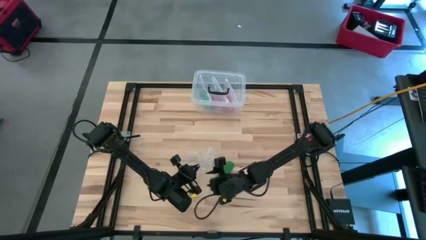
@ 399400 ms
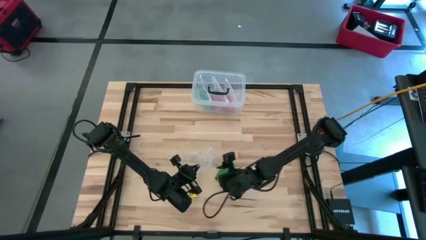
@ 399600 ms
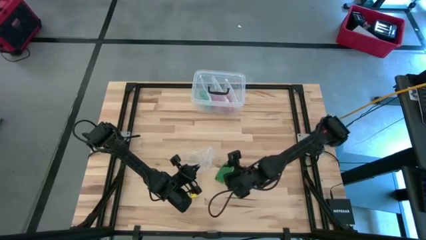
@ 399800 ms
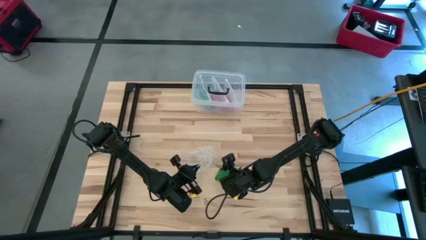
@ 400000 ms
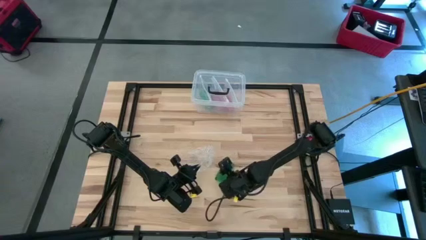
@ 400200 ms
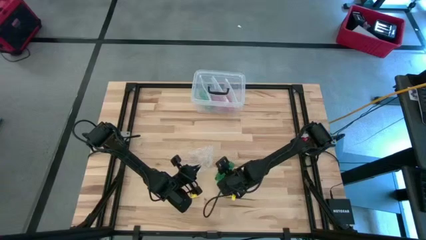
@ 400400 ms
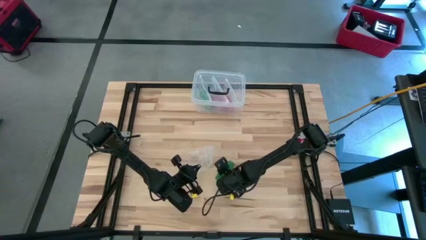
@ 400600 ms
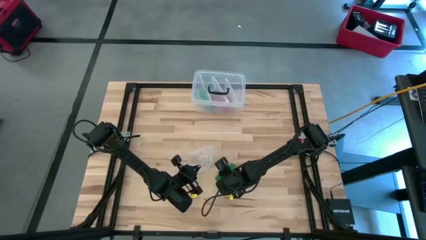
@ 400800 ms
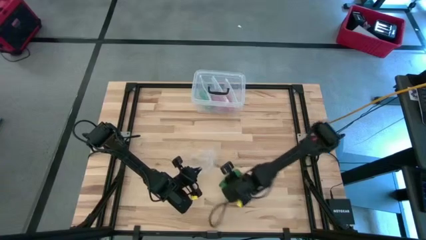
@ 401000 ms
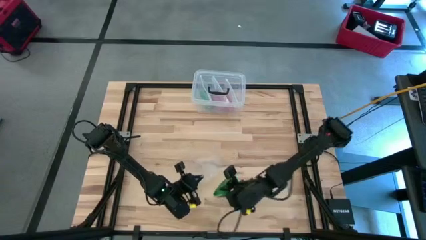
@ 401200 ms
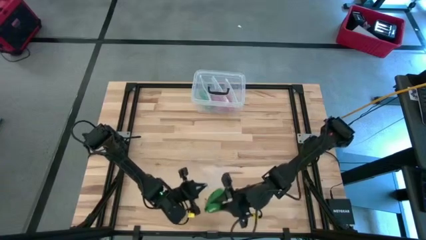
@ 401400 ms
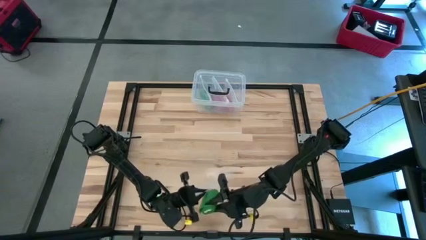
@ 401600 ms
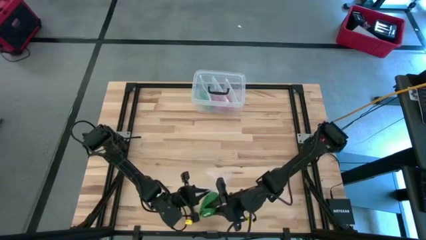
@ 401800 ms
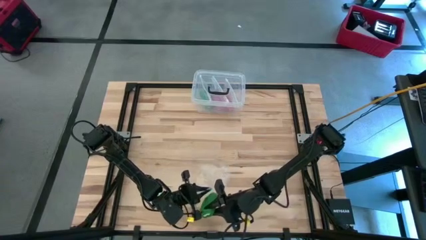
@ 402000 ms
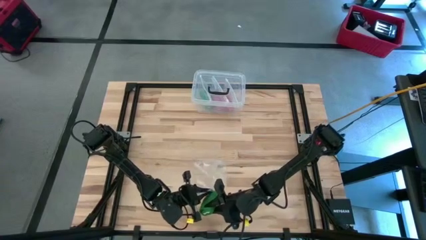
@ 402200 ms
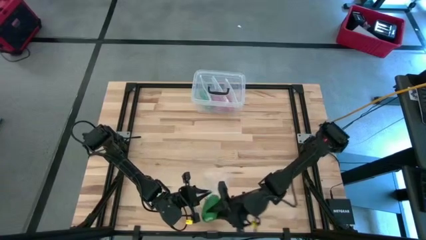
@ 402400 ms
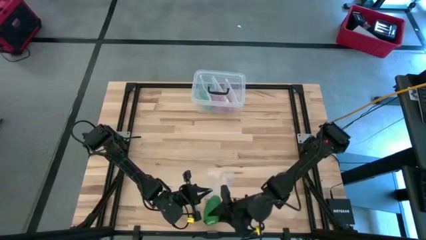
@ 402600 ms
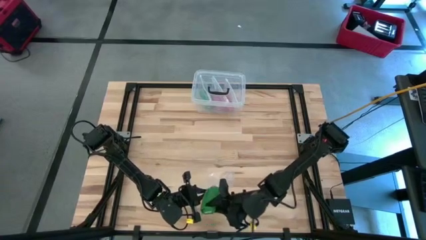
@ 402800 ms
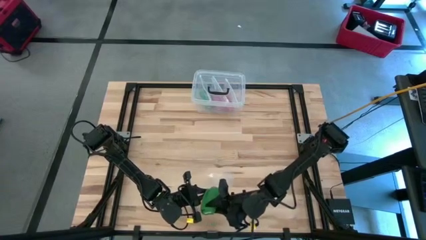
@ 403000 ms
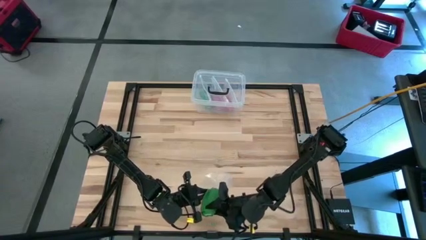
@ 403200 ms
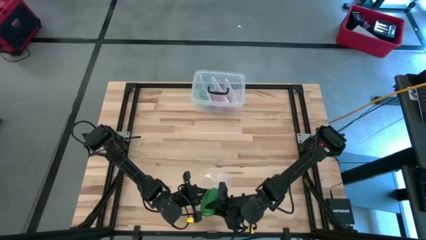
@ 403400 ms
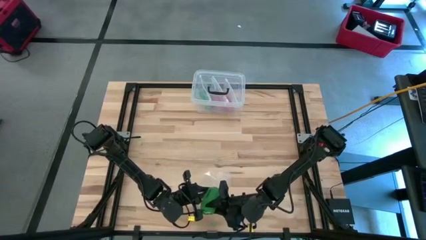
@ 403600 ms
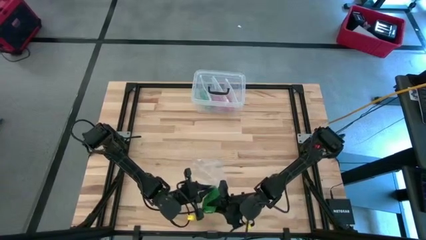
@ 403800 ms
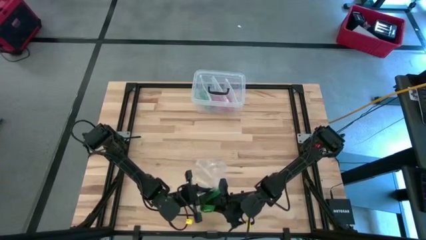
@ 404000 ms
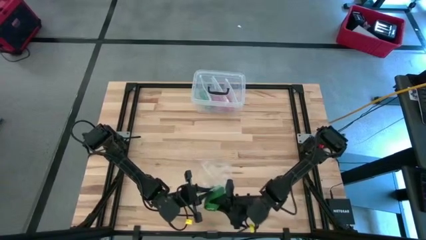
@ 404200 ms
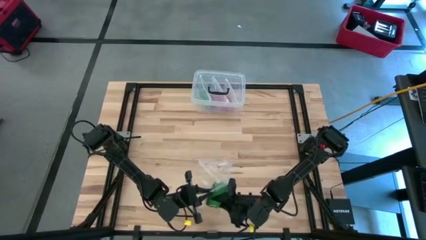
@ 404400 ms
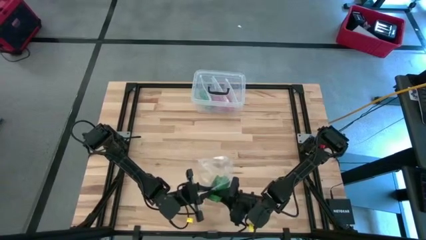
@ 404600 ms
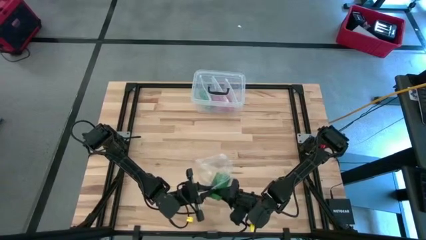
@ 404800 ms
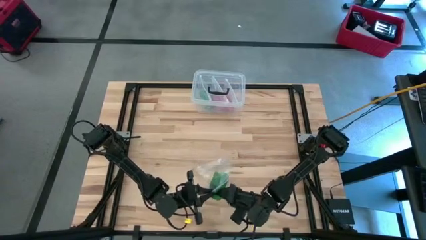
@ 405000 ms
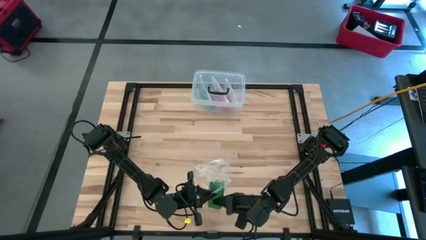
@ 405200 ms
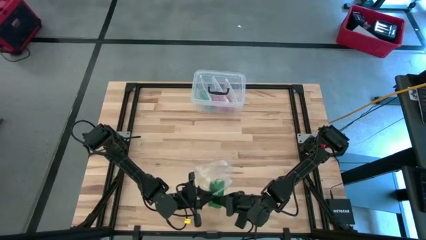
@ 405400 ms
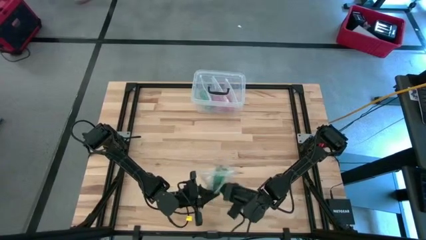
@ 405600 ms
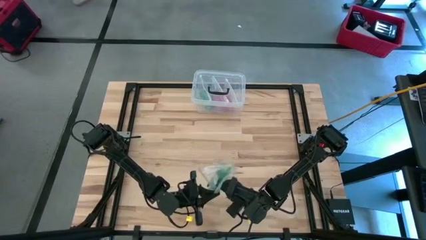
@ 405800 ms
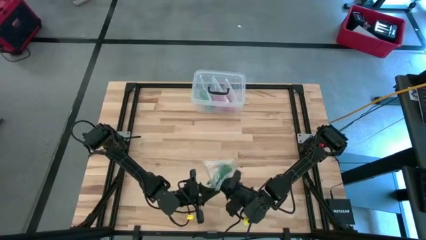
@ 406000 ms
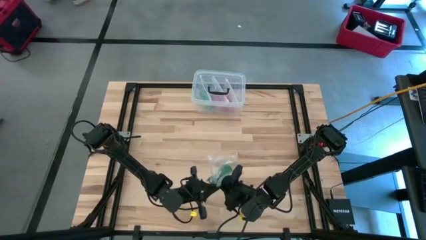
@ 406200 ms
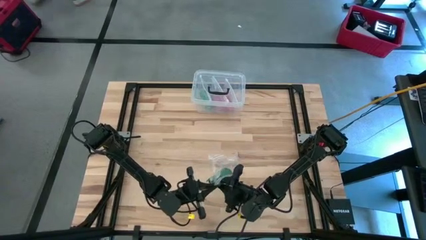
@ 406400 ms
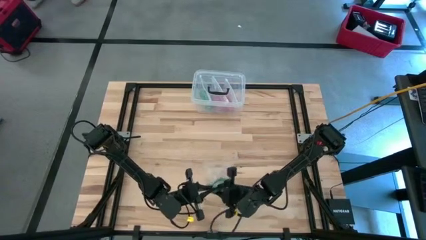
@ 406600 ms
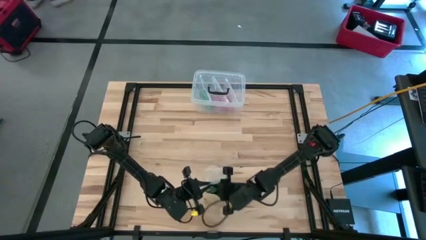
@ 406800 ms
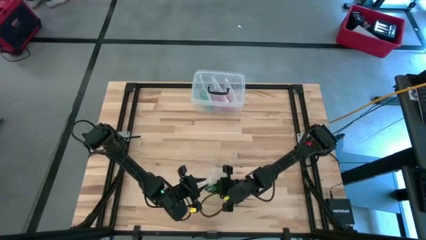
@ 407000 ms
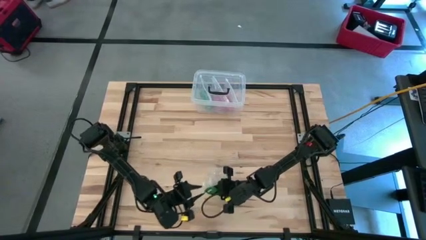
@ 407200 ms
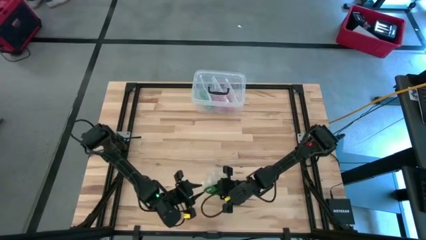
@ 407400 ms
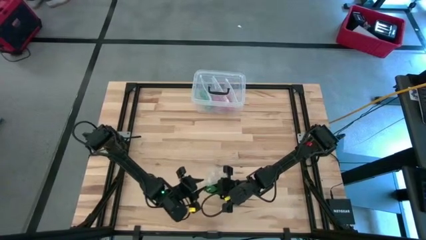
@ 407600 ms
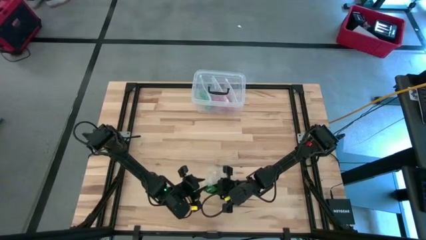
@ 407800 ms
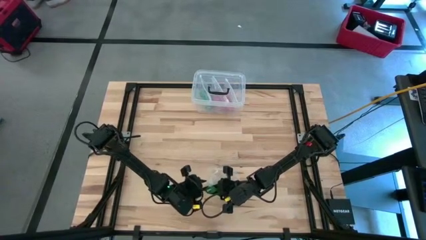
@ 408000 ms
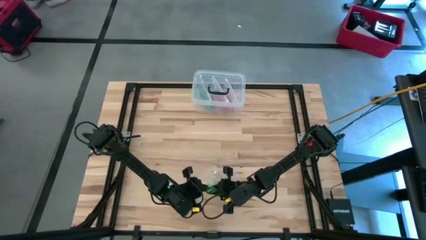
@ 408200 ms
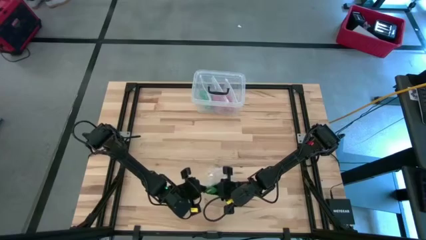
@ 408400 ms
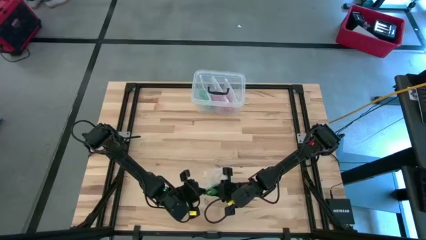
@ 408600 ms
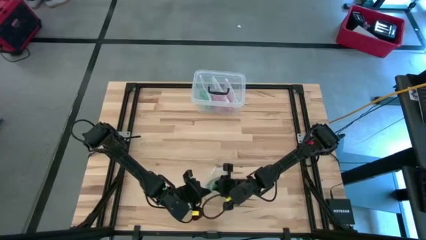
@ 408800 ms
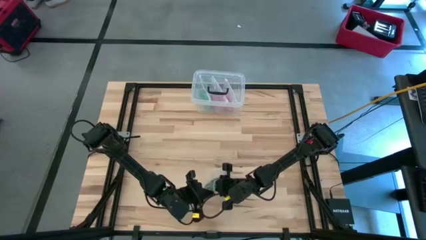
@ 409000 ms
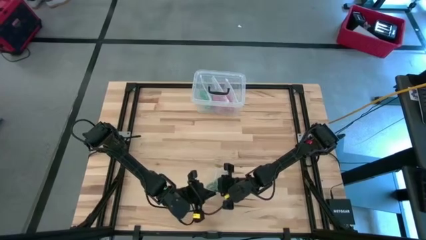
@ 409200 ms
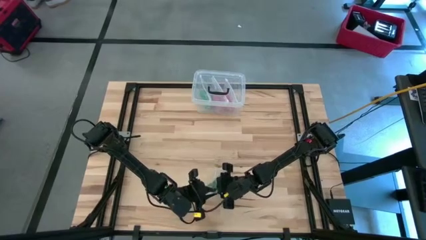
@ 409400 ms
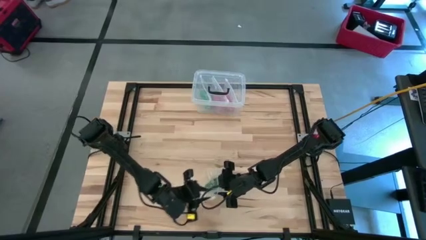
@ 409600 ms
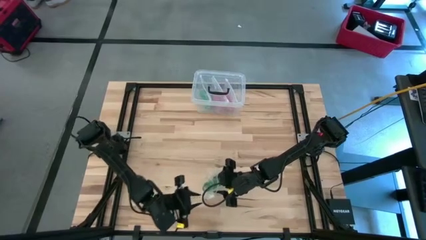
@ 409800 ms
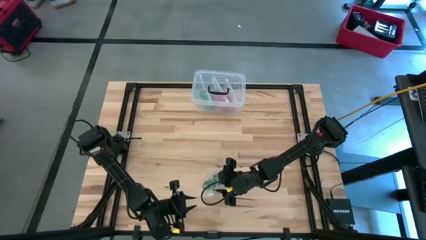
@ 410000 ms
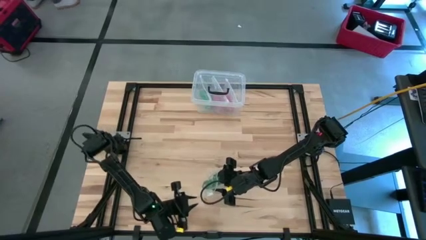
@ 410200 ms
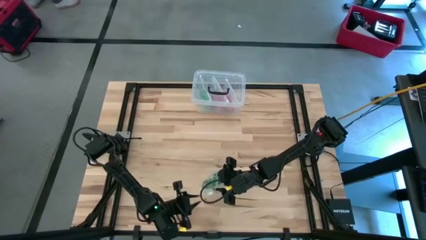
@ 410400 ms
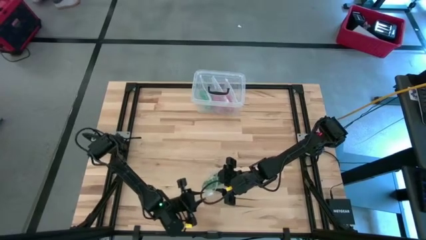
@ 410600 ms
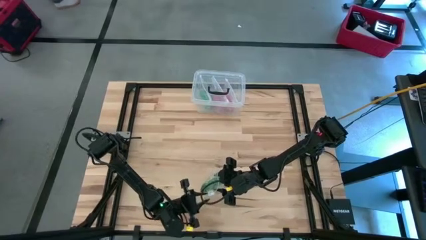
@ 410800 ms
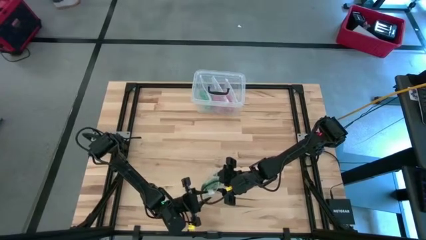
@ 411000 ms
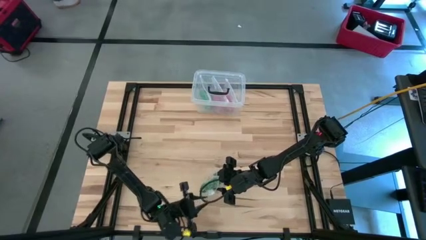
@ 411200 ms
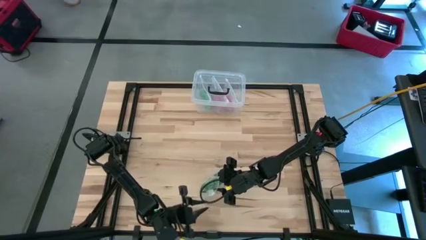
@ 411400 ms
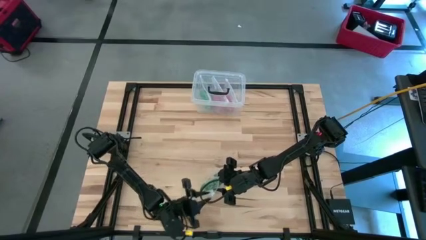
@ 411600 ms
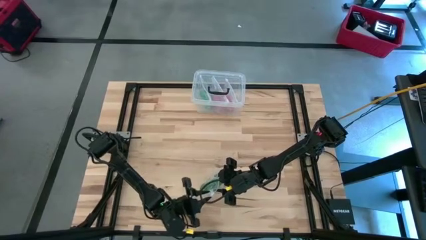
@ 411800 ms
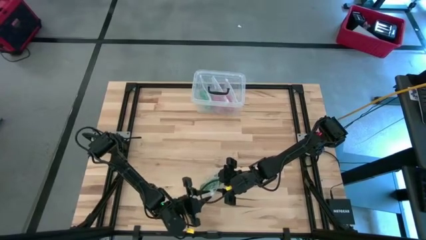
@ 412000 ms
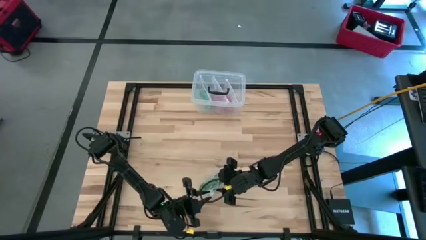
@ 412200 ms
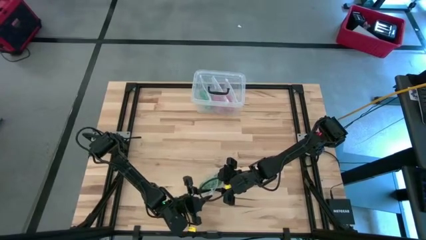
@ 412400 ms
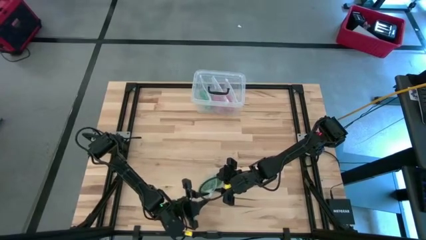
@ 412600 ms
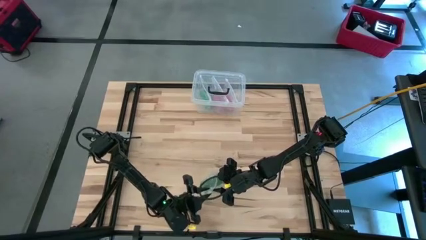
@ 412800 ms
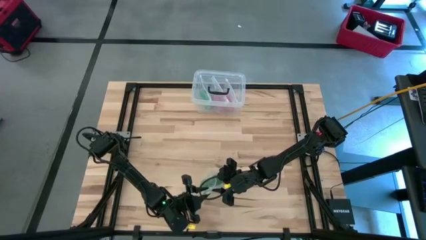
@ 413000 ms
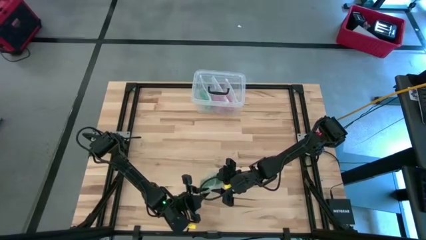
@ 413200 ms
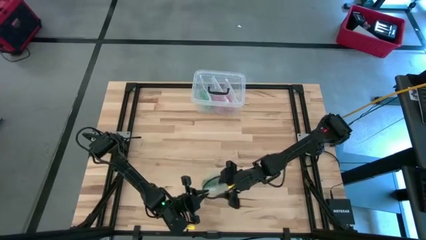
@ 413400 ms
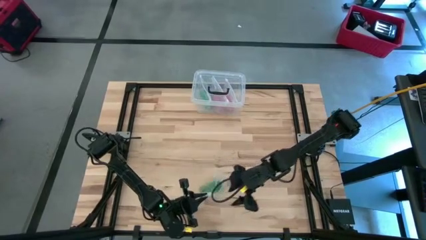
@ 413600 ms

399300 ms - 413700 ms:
Task: Roll bandage
Put the green bandage roll into the transparent zip lock bag

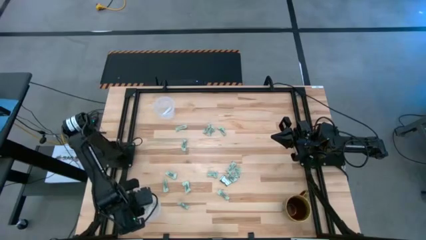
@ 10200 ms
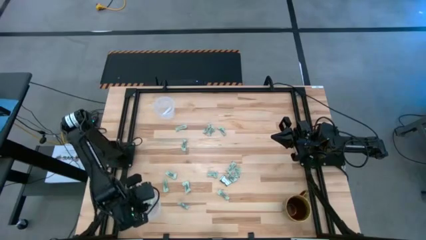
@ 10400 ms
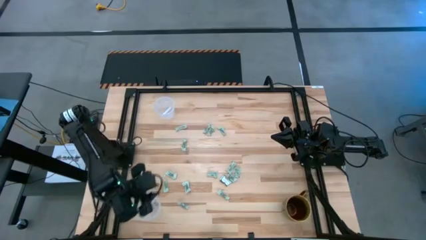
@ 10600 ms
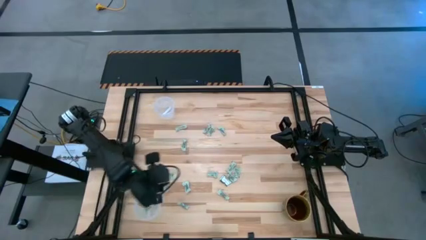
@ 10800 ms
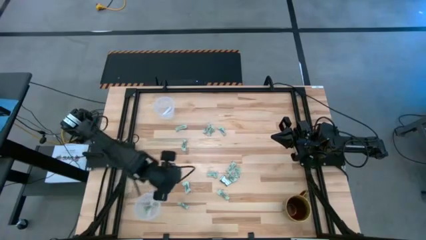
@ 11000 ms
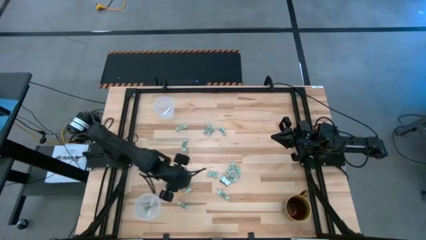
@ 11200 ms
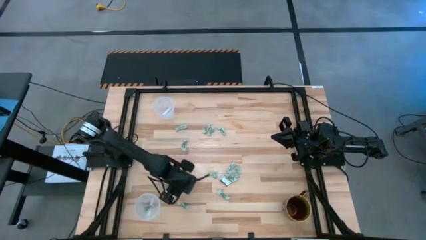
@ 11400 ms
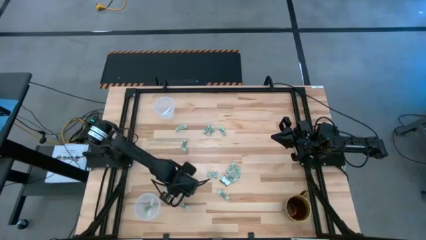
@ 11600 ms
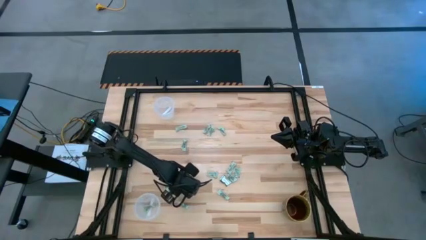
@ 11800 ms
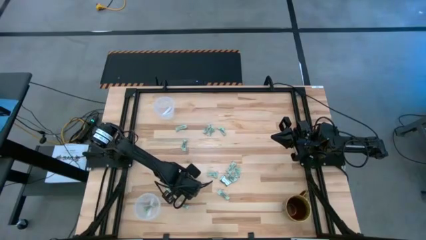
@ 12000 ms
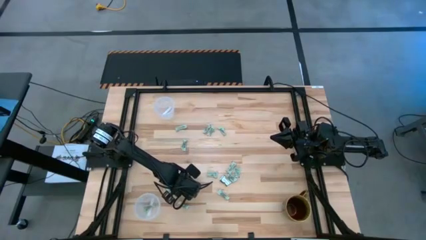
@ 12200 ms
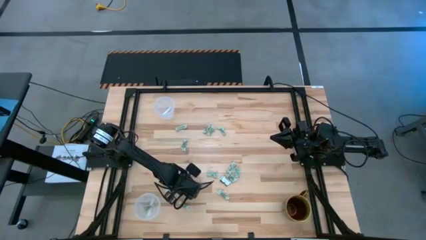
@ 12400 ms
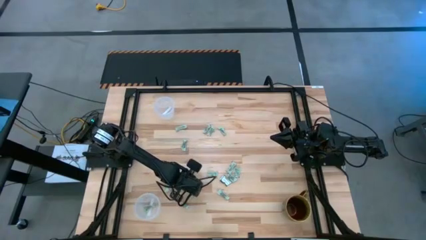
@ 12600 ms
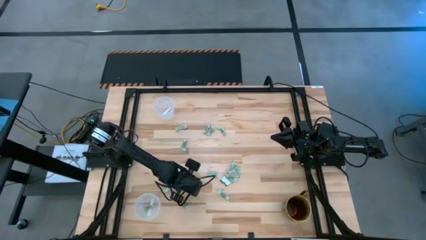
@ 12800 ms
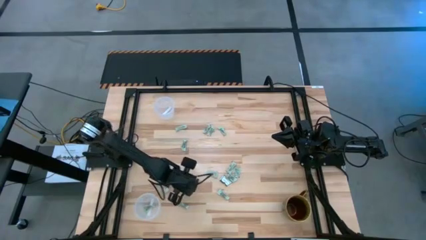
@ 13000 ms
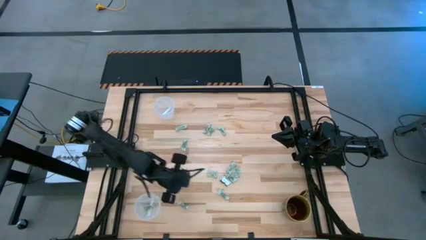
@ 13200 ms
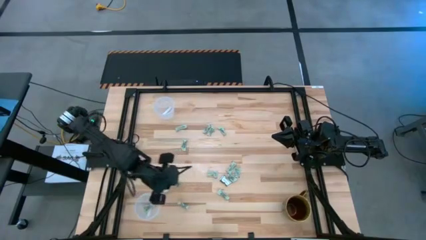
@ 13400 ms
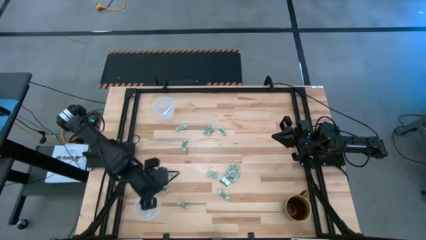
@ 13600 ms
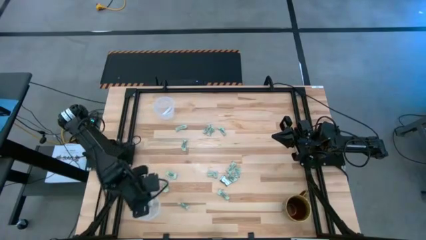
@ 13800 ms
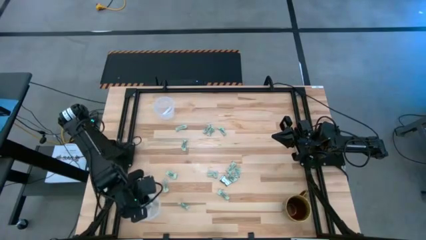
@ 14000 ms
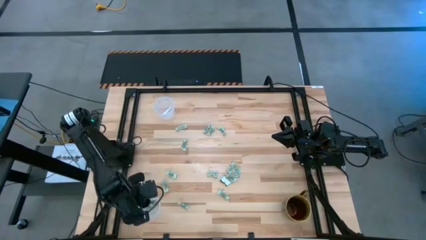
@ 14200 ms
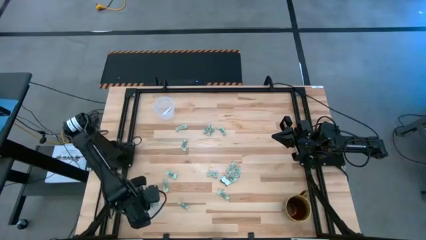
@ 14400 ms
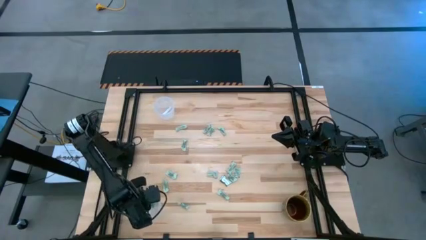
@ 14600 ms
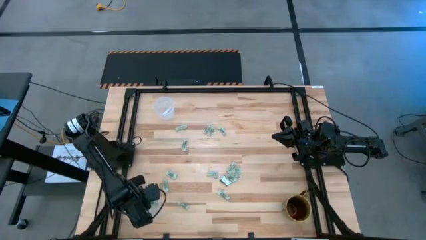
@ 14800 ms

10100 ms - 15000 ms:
Task: Pick and place Stevia / Truvia into bins
Put the stevia packet into the bottom transparent container
